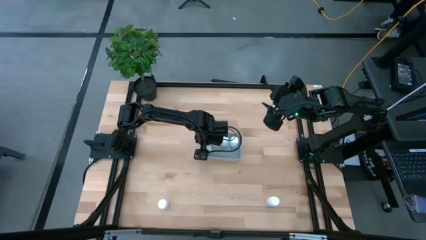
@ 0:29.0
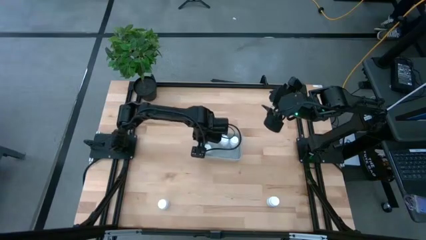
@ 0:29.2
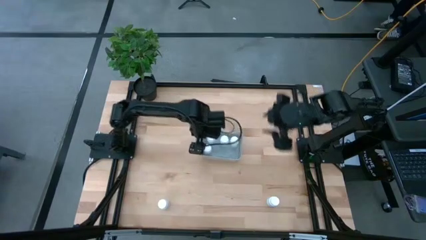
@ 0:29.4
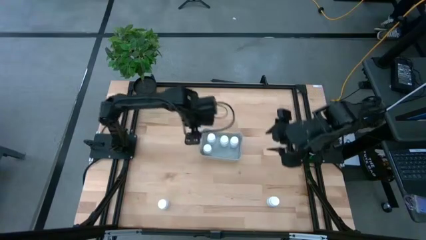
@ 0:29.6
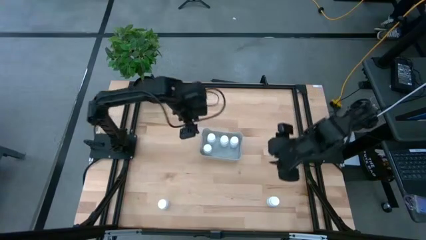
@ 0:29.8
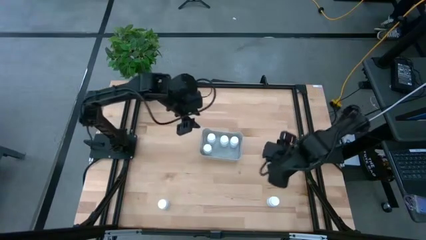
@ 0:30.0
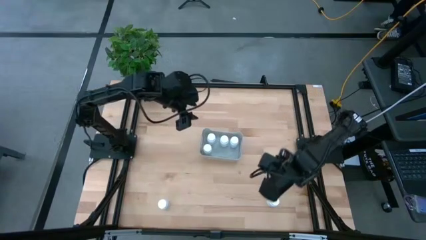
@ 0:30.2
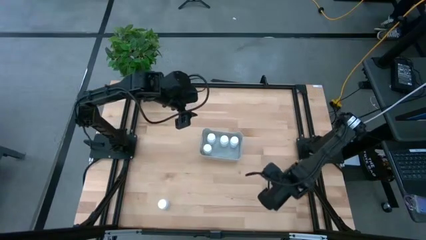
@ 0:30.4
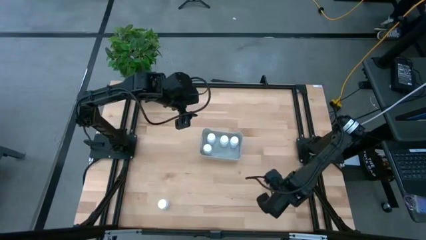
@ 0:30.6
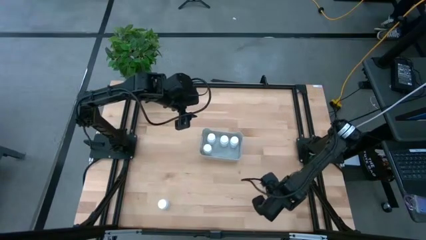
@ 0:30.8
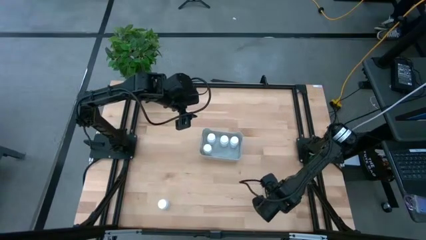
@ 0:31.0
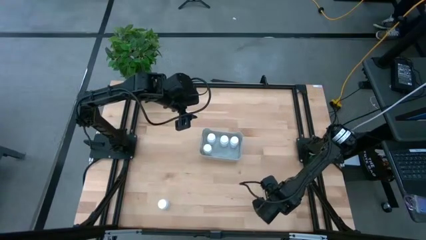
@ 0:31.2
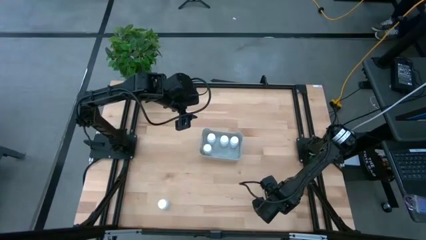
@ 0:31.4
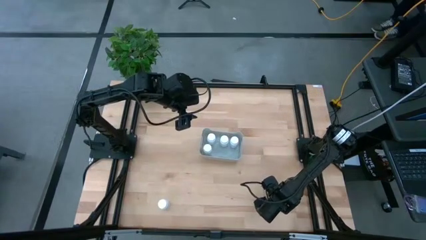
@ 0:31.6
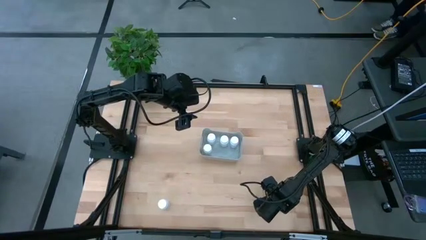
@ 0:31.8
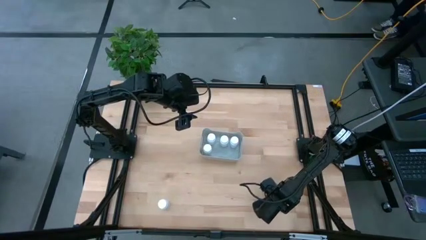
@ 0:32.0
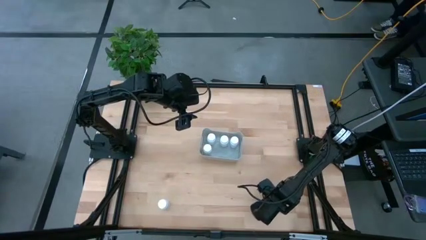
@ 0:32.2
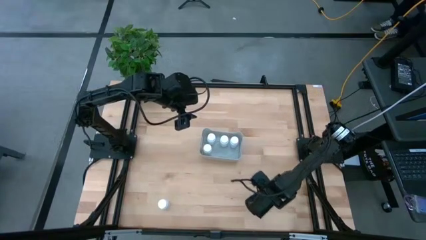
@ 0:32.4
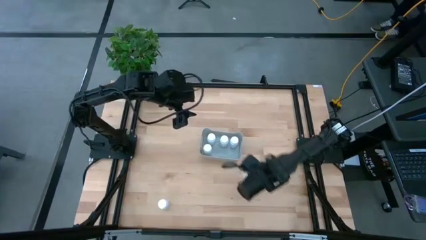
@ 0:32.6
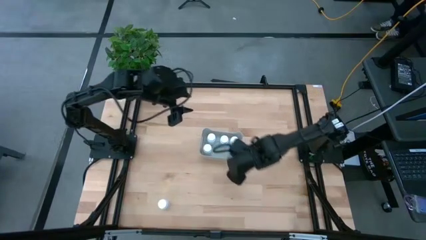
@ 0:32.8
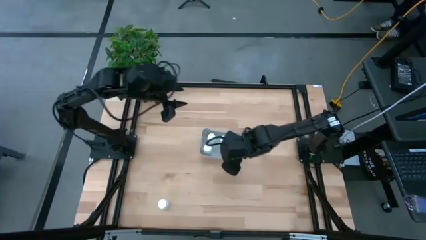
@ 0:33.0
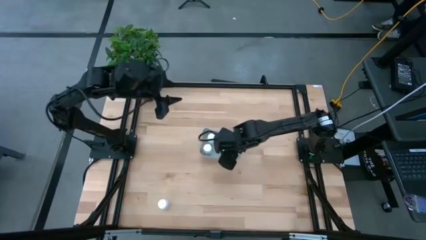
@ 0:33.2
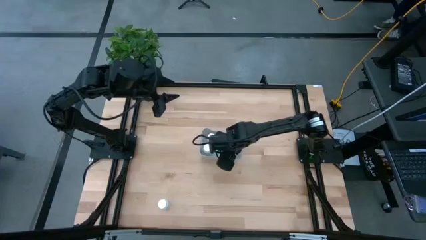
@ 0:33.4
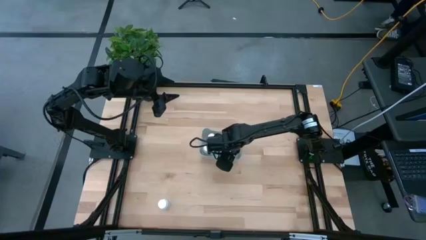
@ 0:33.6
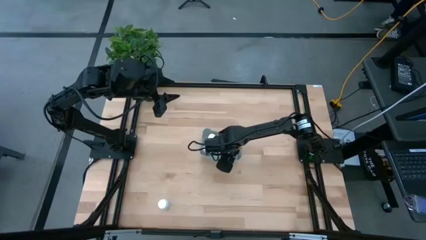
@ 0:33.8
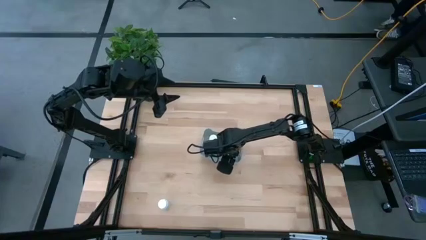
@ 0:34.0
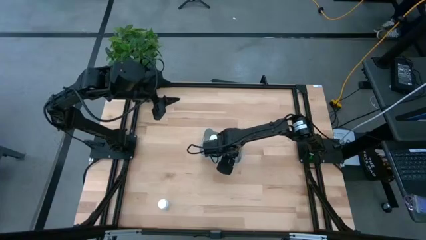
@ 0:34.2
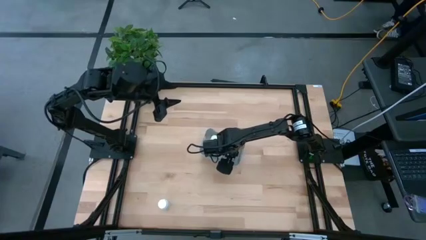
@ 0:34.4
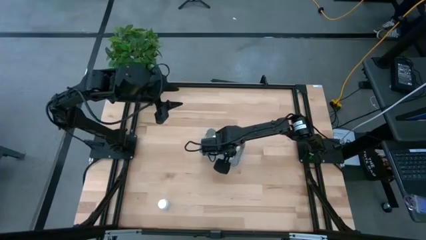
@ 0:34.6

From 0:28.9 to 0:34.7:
Task: Pick and place pill bottles into a basket
Put the right white pill bottle into the gray bin

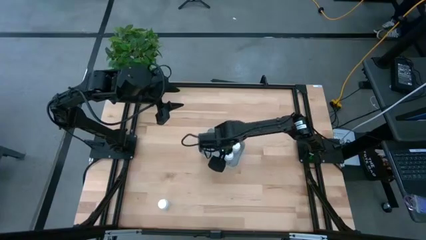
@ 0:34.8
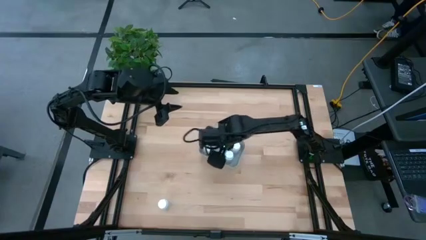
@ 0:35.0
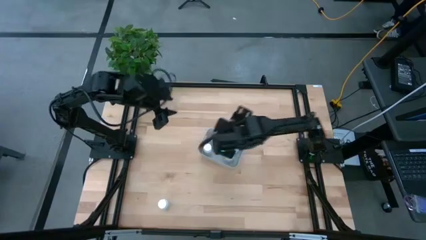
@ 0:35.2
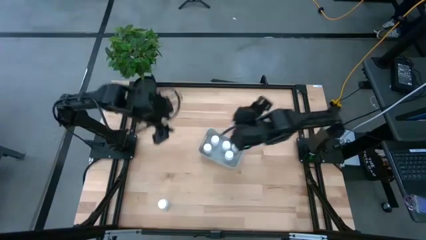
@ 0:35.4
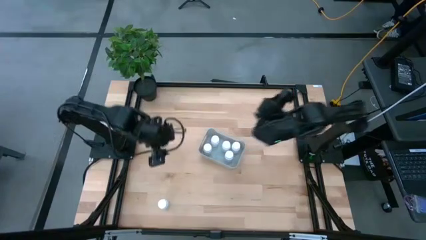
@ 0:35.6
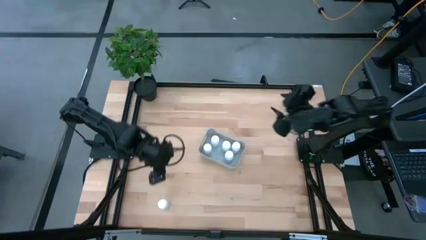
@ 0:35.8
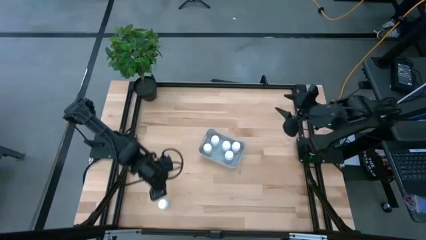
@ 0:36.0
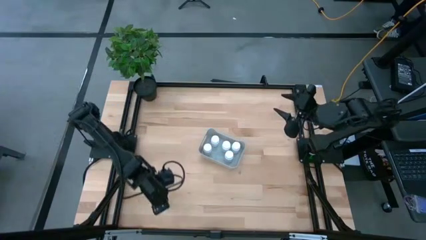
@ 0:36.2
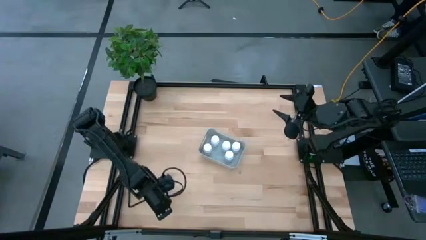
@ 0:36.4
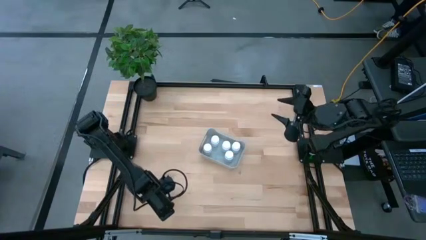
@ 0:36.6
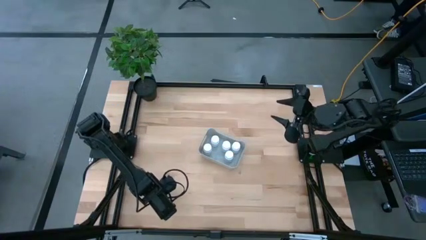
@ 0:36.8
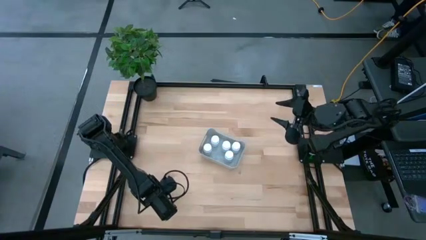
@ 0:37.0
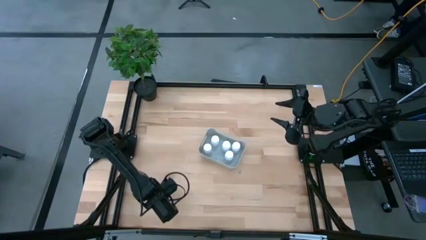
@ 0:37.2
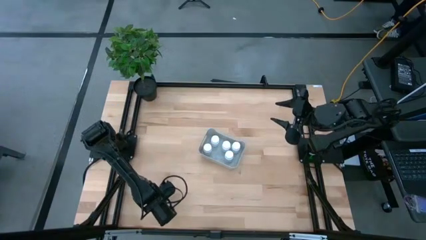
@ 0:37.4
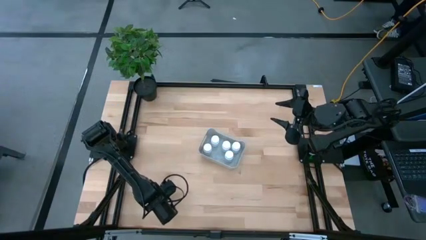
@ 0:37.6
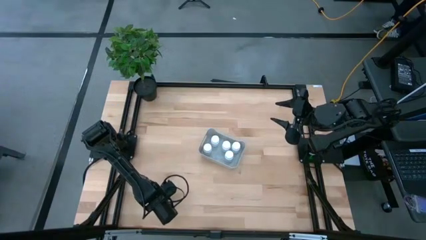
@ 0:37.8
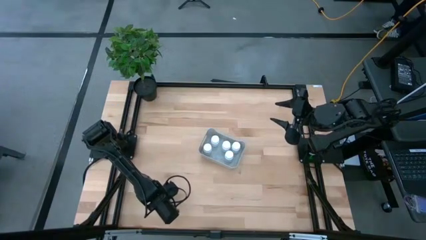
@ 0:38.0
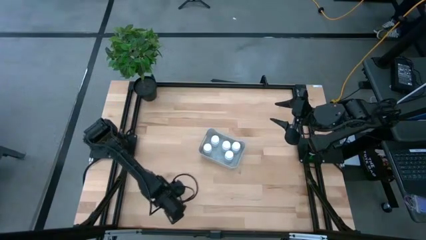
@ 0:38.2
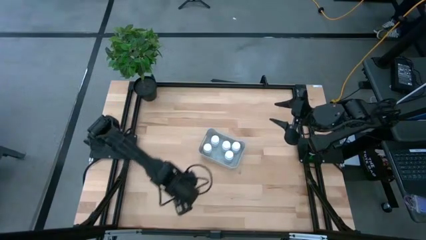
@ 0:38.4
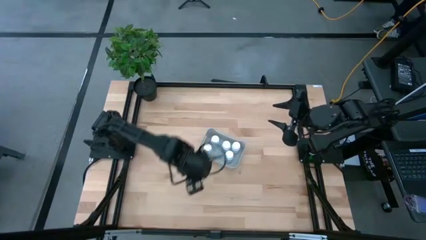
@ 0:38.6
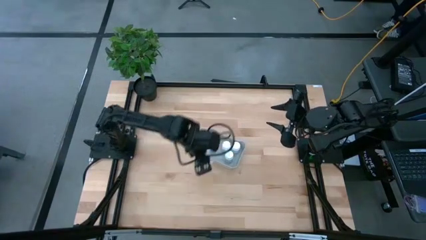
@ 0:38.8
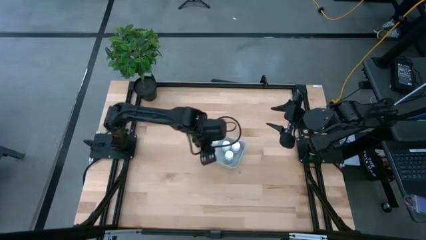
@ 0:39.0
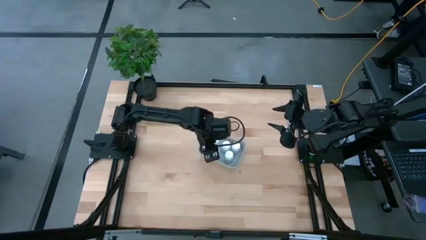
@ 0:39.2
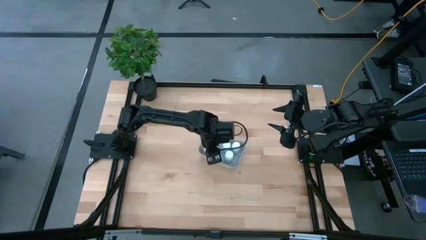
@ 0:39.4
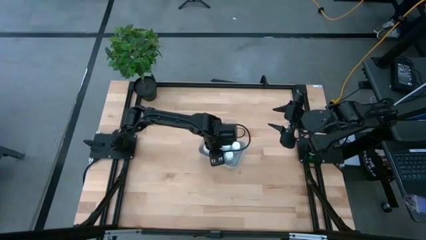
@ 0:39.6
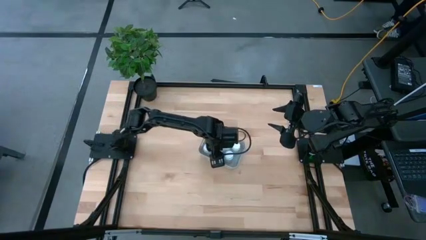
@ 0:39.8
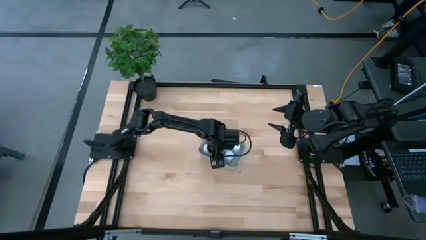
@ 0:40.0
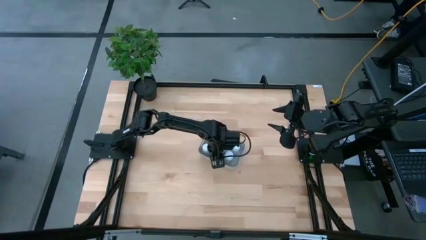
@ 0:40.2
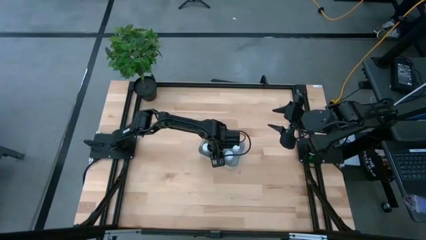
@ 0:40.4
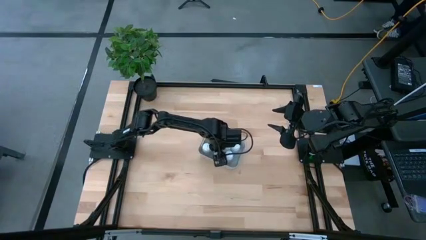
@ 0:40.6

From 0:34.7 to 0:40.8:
Put the white pill bottle into the gray bin

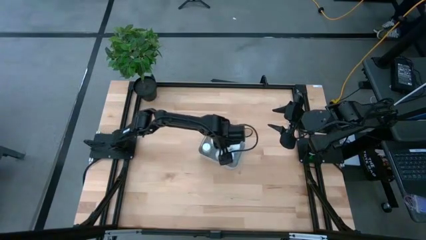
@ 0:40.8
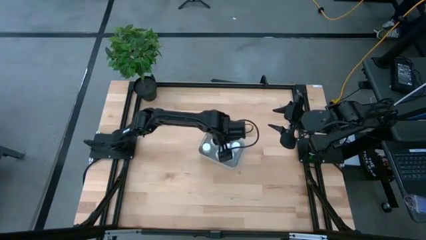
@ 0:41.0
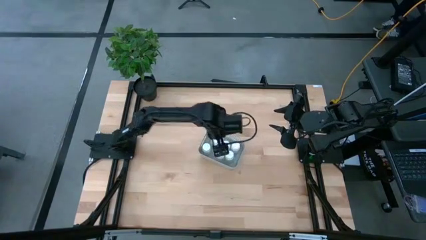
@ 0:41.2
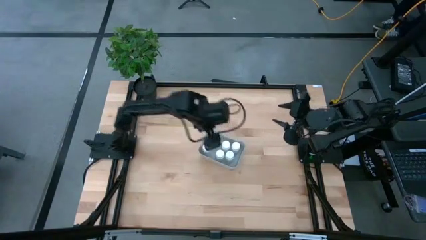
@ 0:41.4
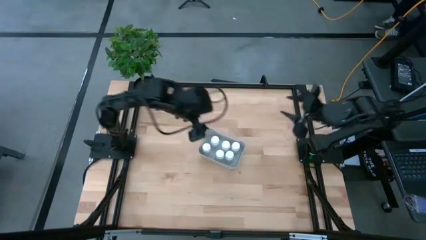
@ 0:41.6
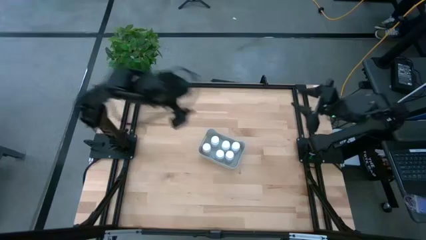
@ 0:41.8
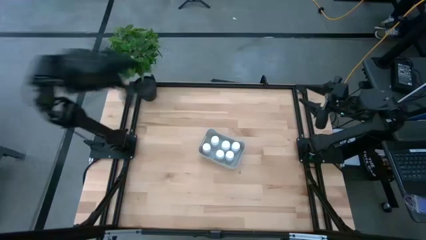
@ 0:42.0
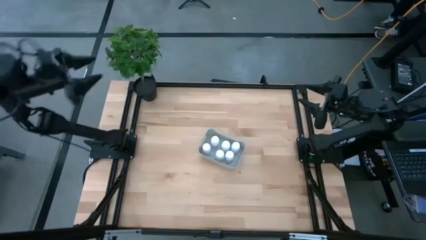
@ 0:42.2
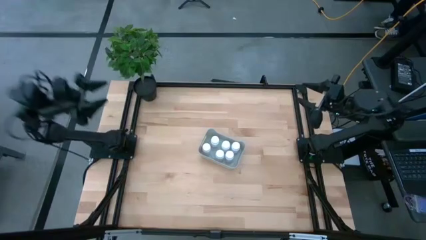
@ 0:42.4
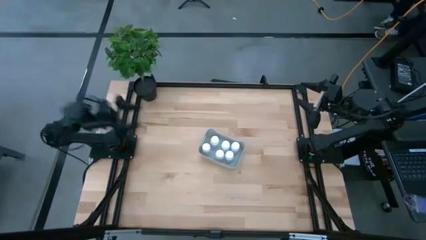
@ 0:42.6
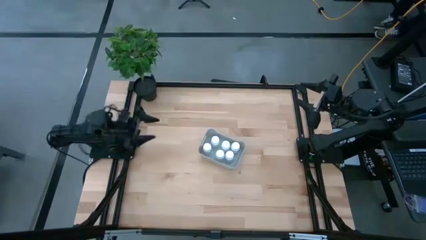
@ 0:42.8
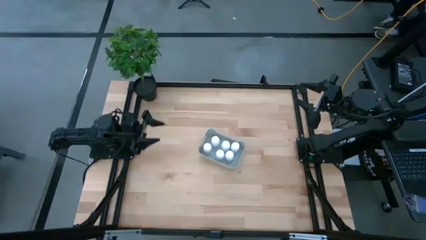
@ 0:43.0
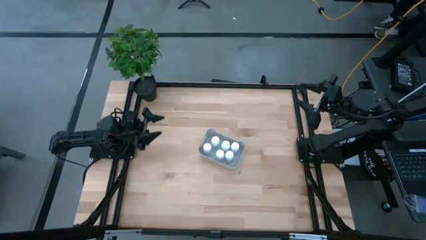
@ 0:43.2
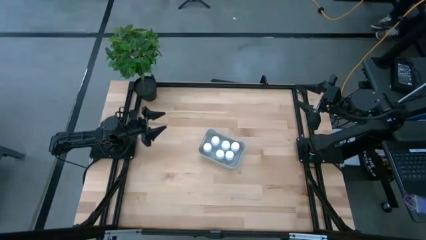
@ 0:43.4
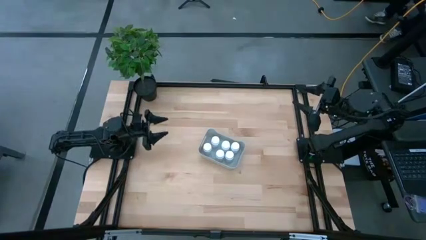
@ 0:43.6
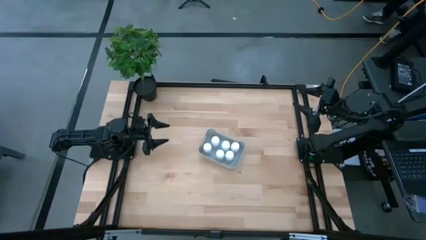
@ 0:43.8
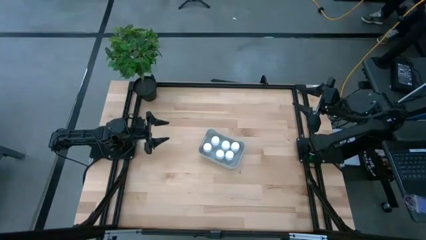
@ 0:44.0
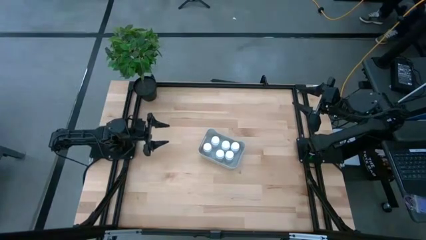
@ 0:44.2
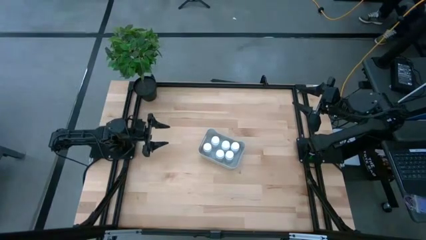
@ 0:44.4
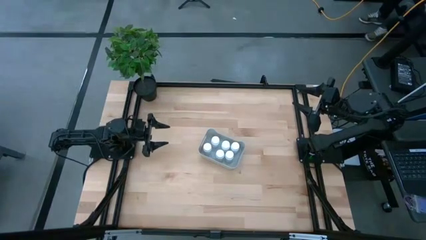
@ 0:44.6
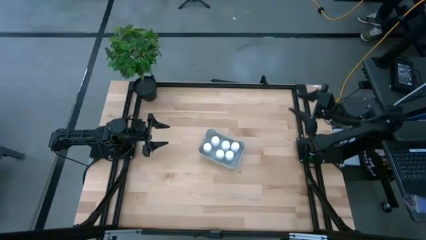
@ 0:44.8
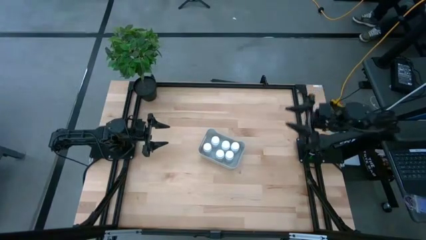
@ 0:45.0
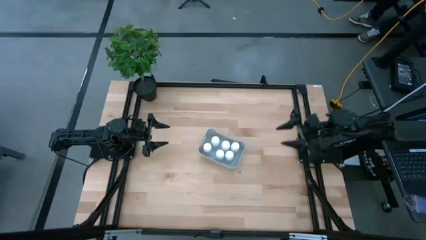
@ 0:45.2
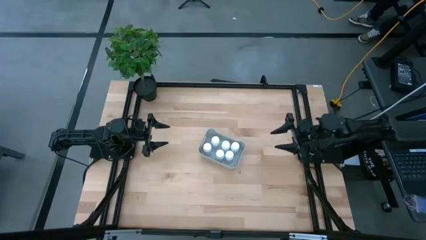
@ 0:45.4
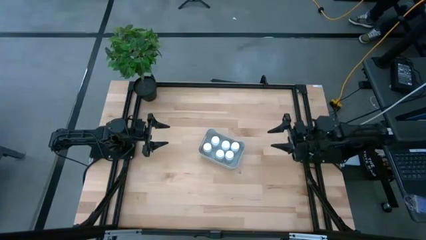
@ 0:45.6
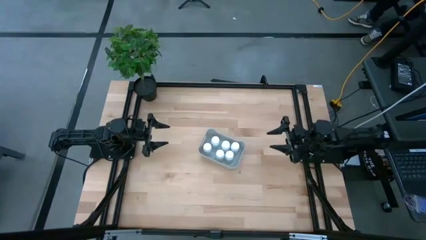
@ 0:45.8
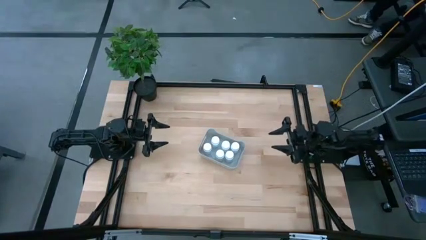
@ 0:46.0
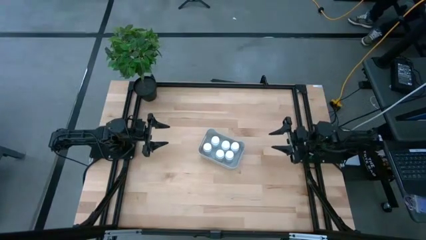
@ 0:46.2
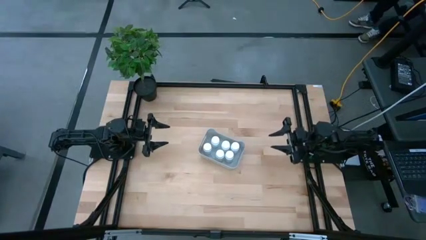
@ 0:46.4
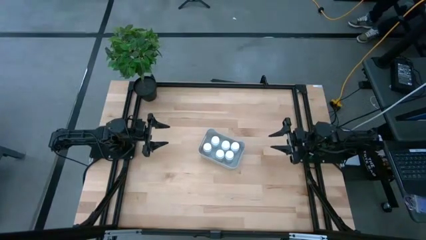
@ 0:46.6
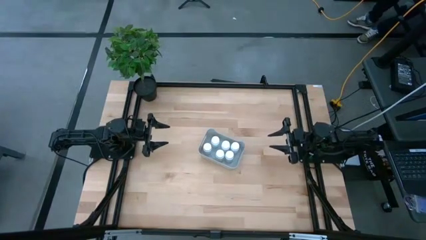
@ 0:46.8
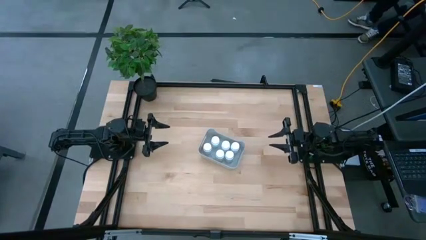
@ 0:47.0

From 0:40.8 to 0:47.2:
Return to Home Position
